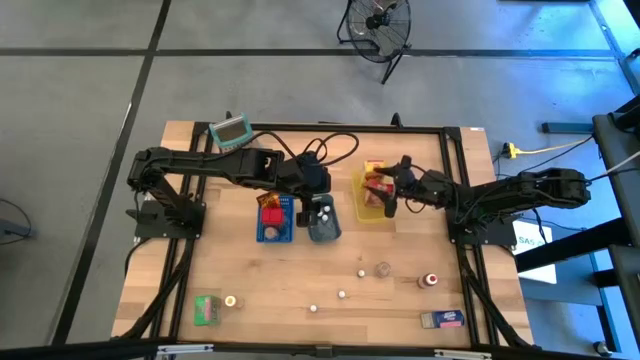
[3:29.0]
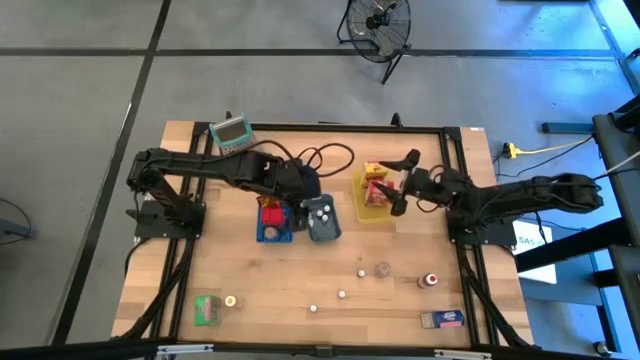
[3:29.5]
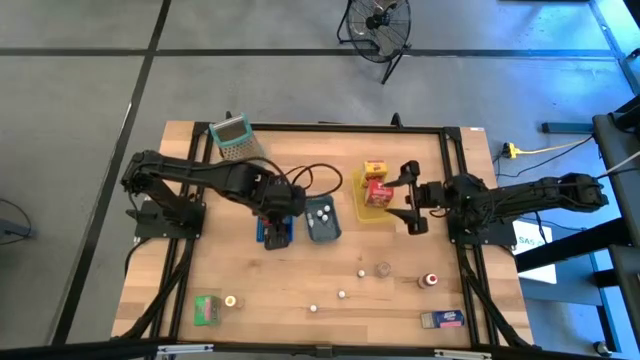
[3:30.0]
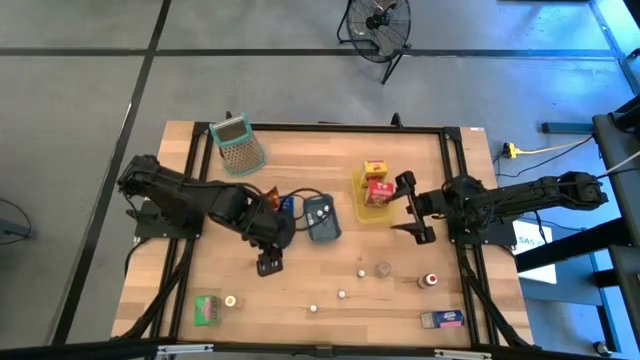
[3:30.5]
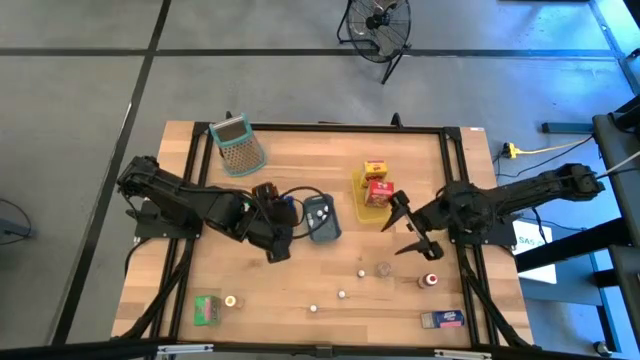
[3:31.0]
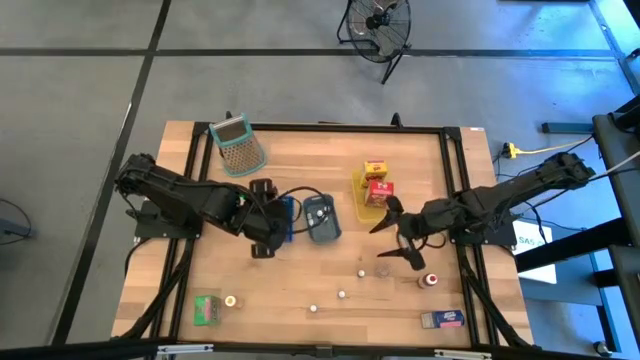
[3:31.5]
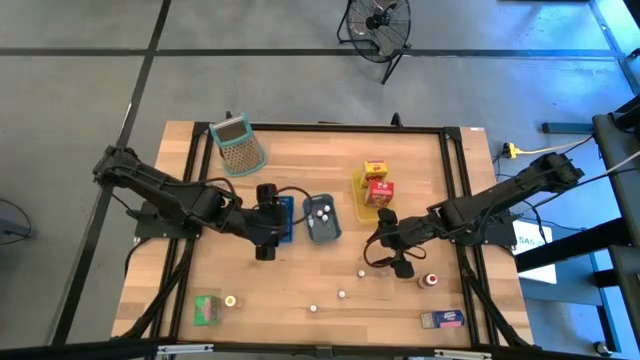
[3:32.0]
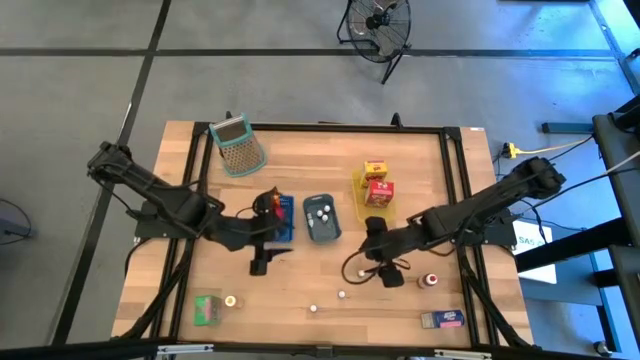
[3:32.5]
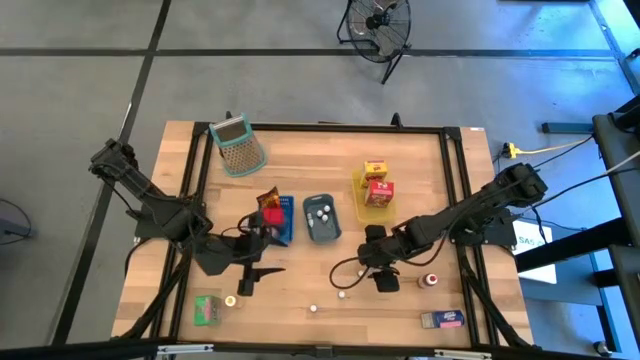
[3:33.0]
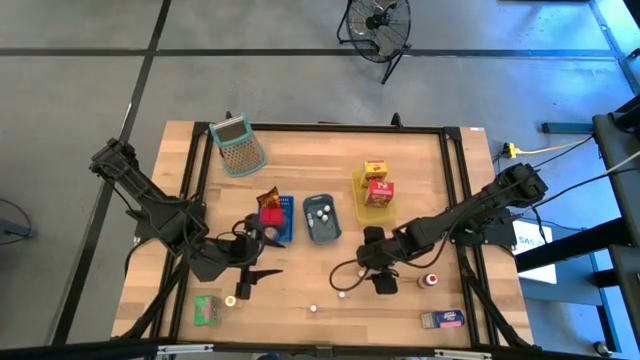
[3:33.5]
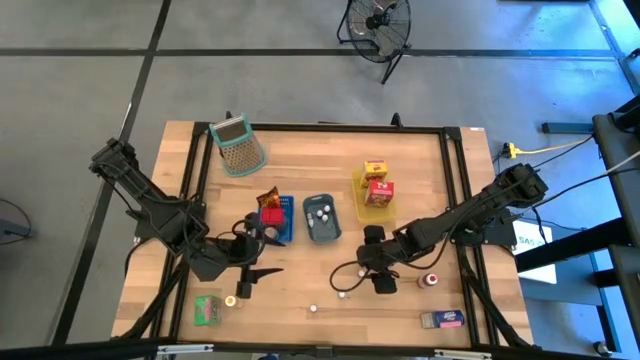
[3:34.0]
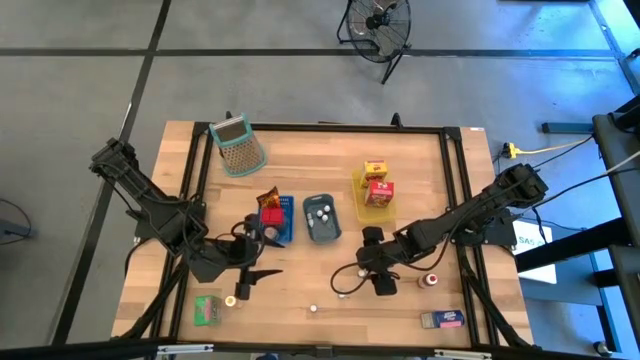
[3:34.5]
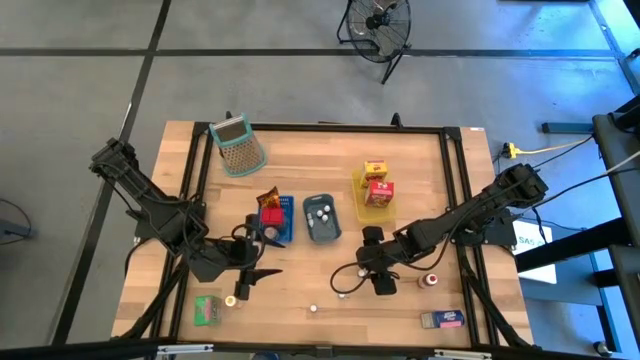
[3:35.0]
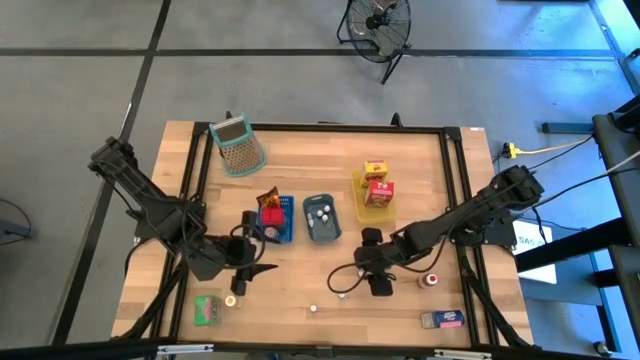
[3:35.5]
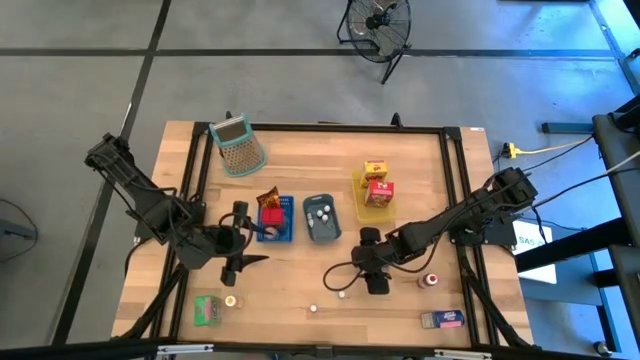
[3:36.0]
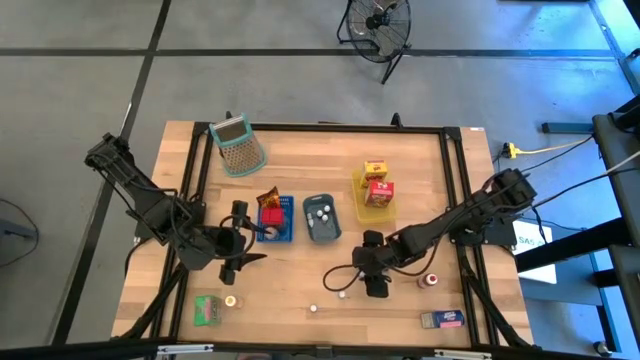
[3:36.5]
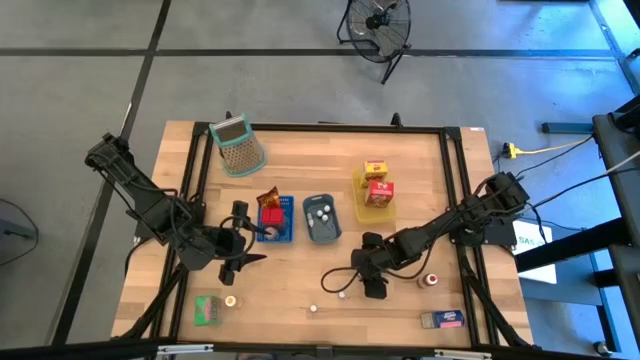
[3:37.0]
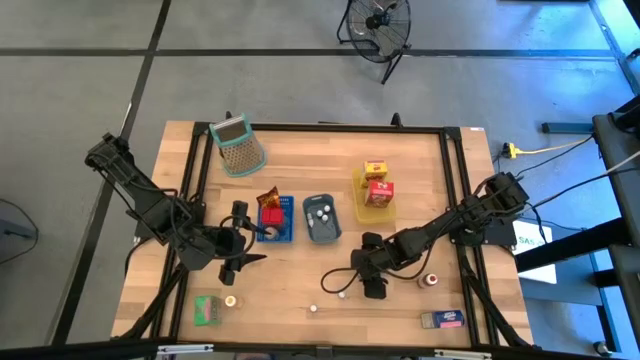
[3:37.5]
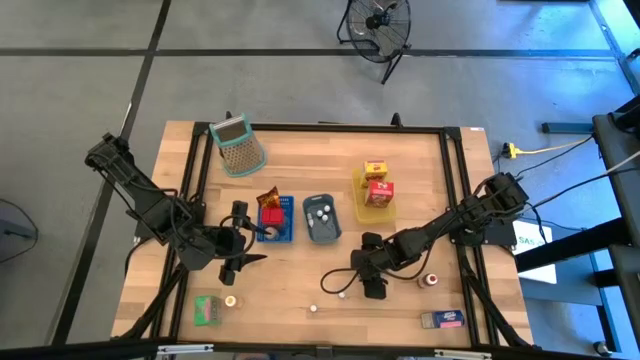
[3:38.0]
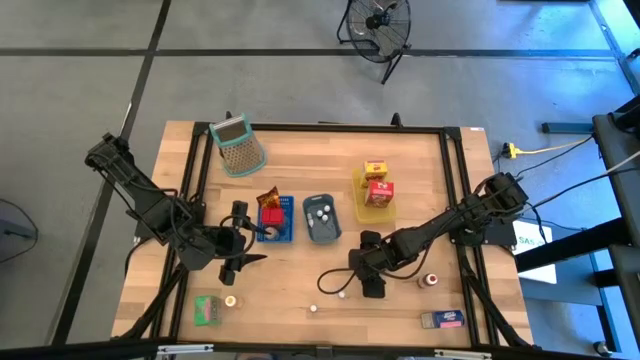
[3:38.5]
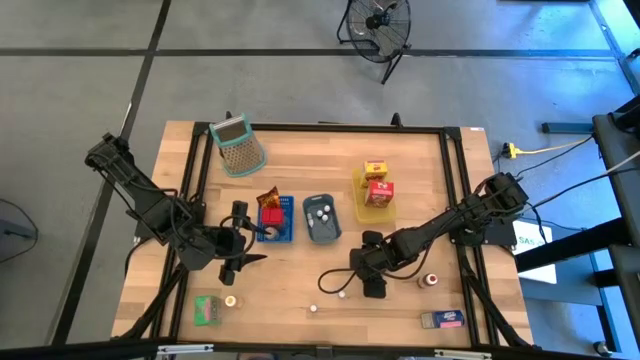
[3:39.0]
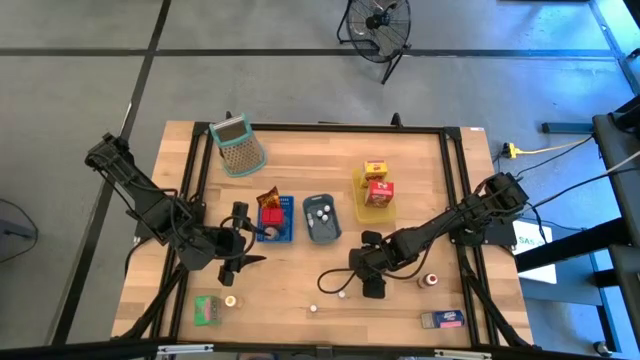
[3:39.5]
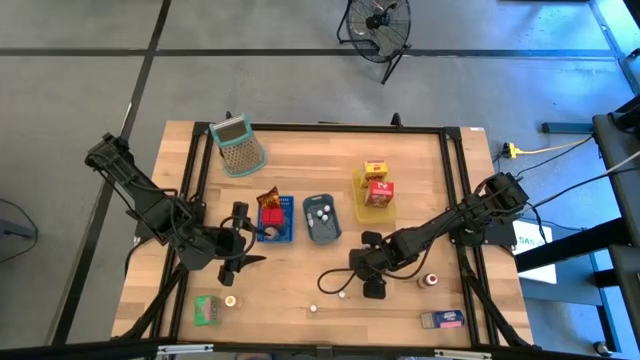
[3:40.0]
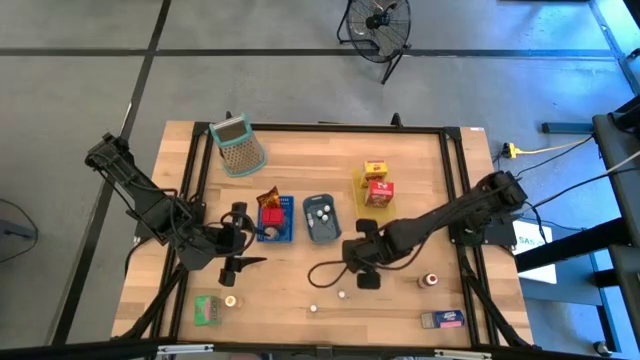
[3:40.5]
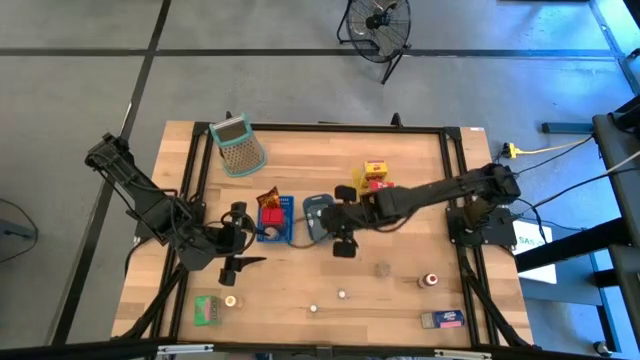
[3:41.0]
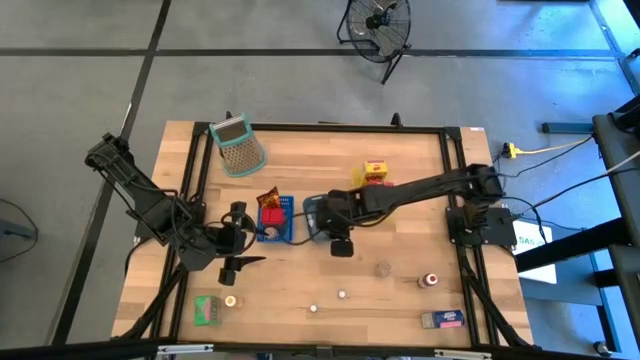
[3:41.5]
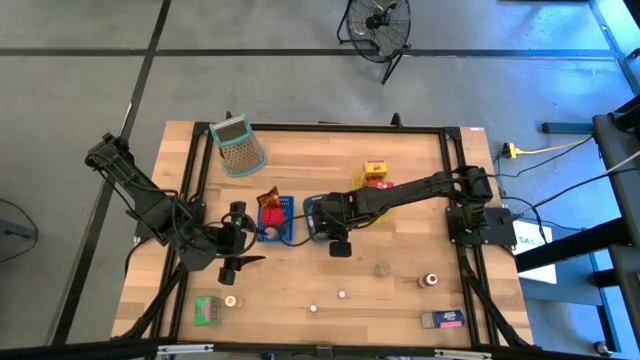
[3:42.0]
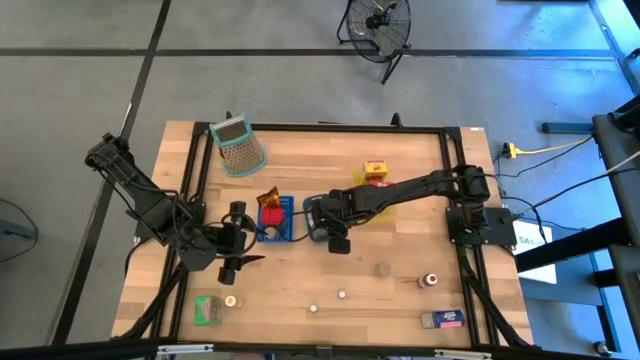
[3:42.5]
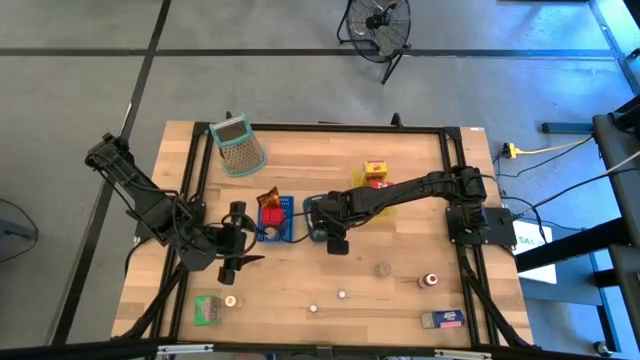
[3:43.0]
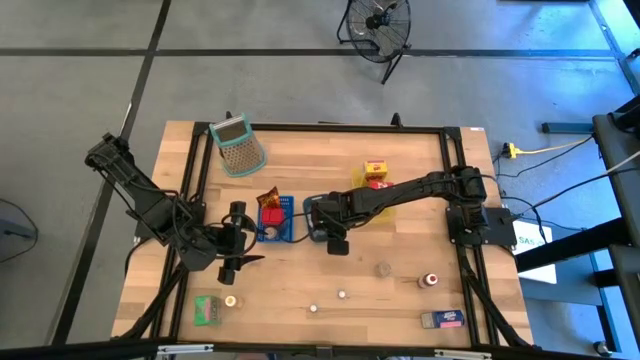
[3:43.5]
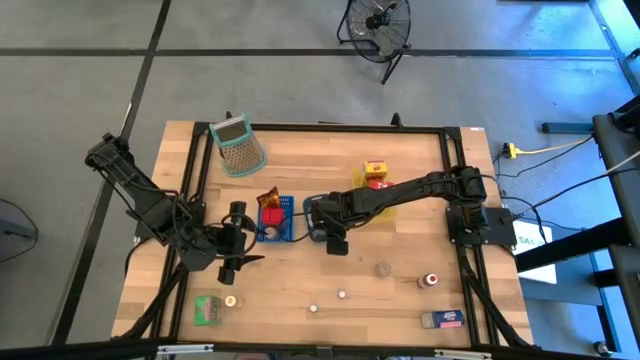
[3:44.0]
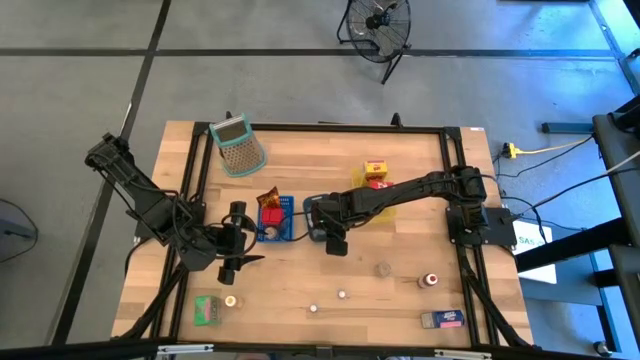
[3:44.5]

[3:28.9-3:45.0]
Task: Pick & Place Kitchen Items
Put the small food coloring bottle into the gray bin

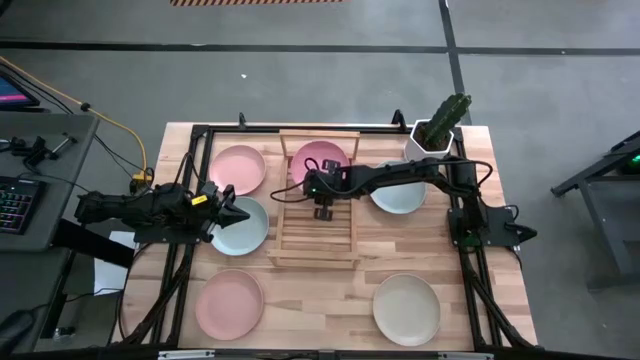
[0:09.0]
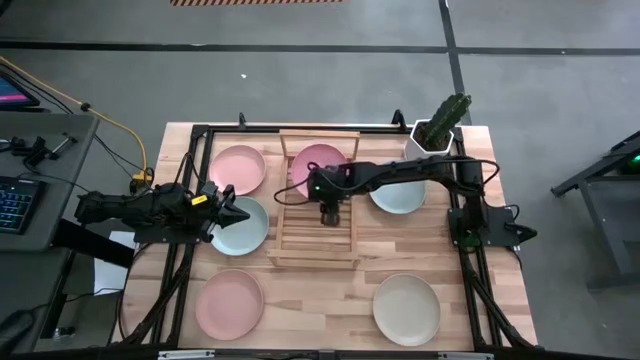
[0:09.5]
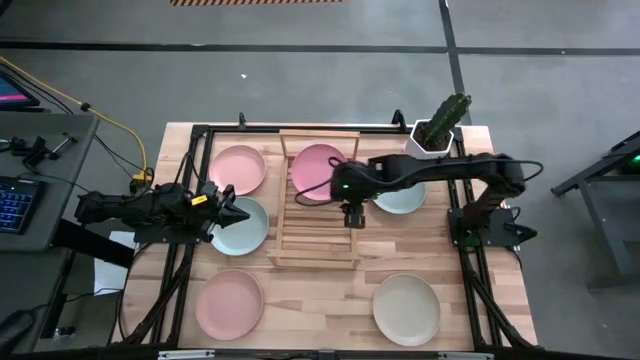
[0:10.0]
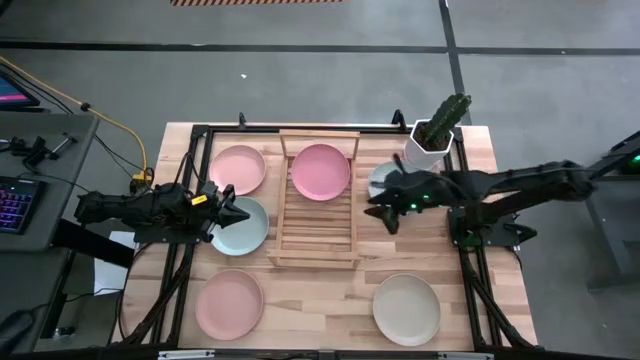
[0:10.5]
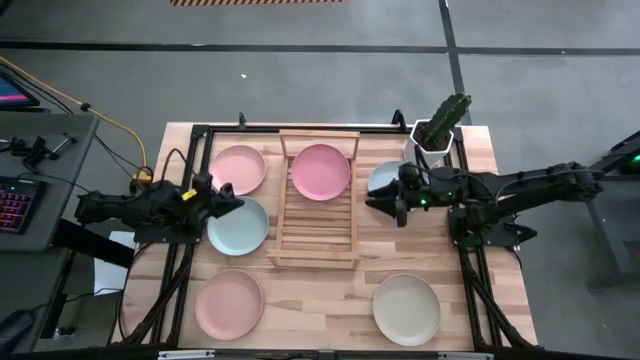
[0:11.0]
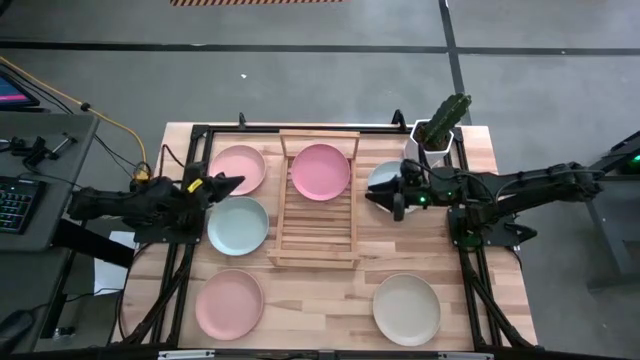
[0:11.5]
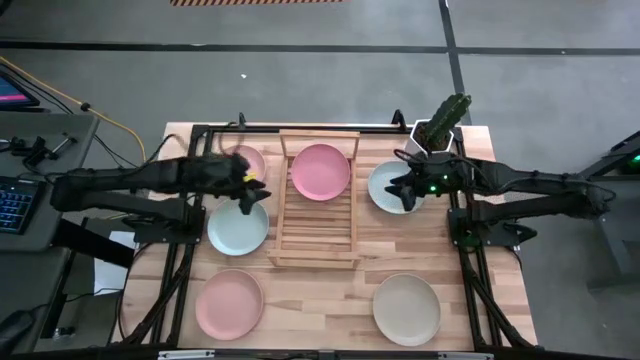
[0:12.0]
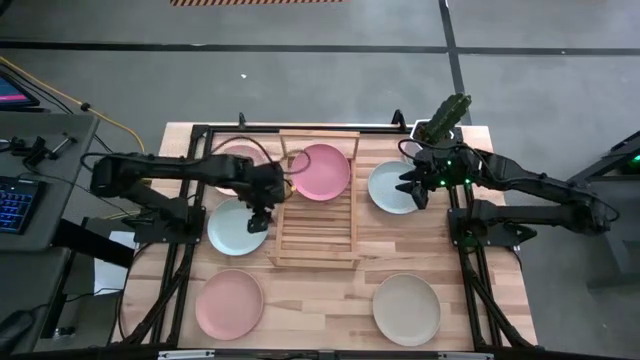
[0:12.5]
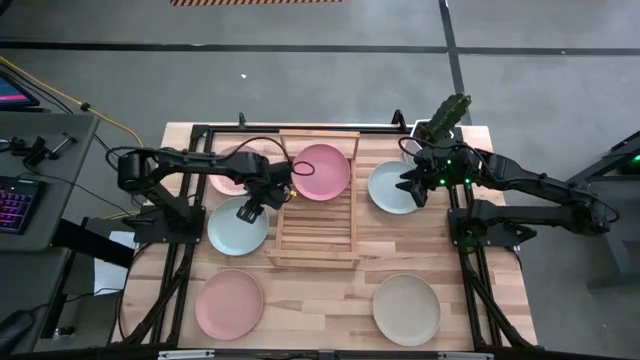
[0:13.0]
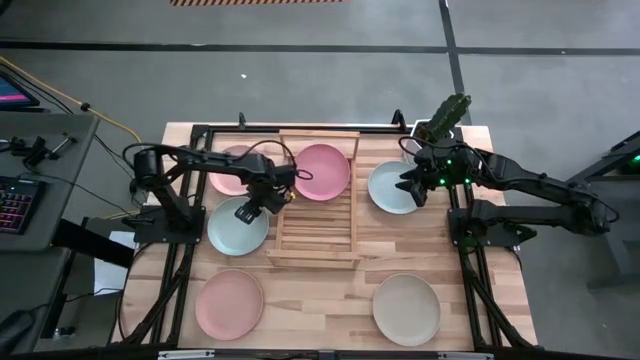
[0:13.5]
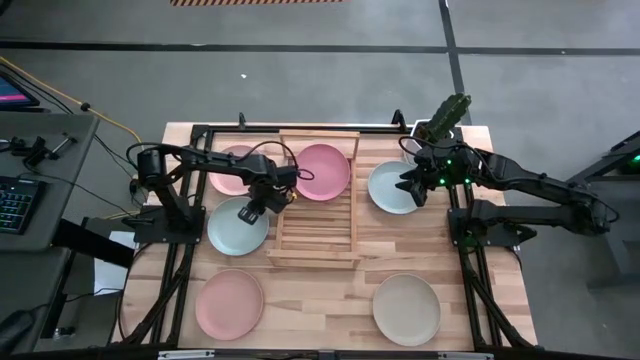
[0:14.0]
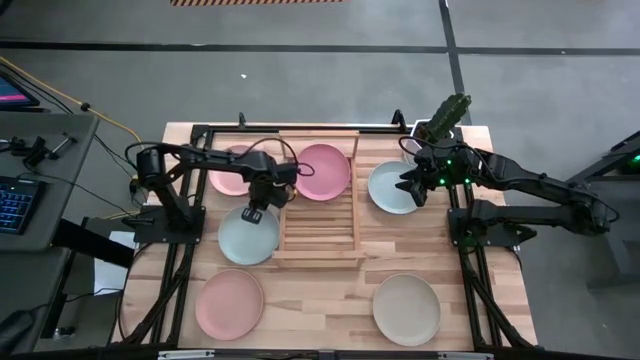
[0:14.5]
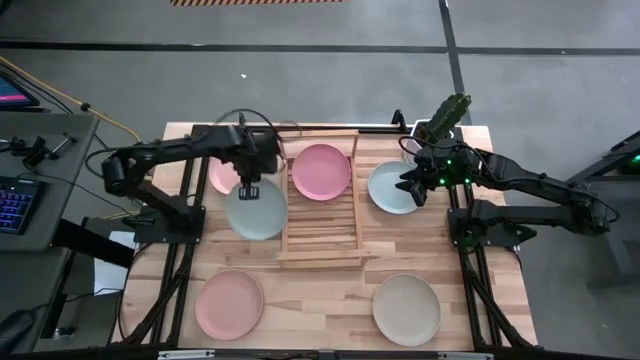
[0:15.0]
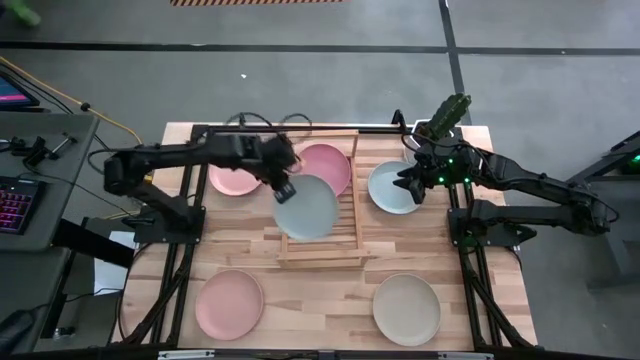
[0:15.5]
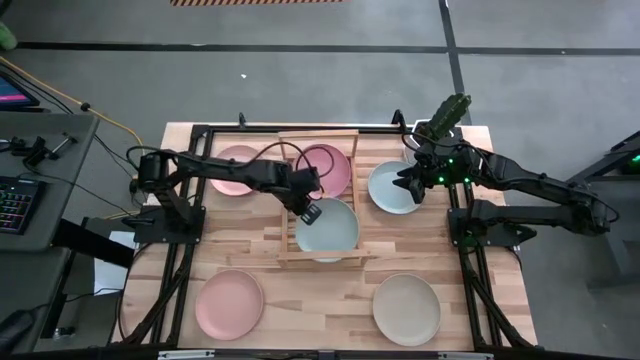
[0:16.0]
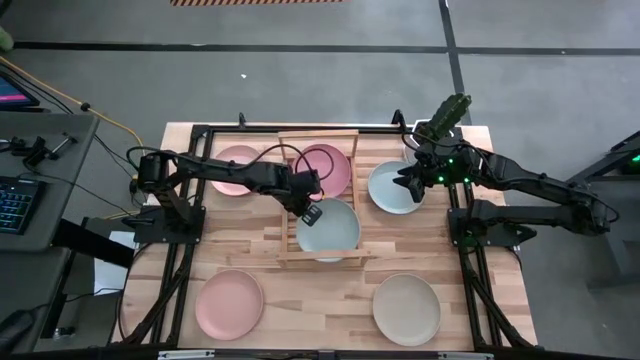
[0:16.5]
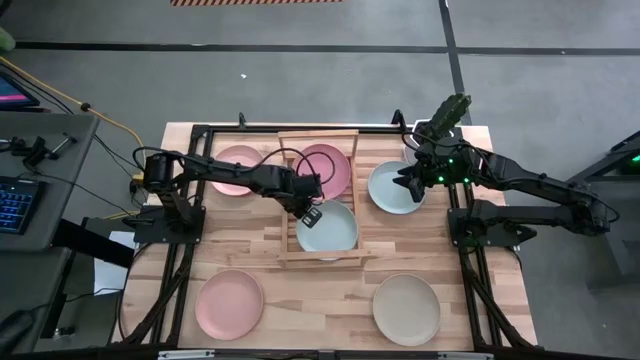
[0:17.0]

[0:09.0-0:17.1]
Task: Place and stack plates onto a shelf
Put the left blue plate on the shelf
